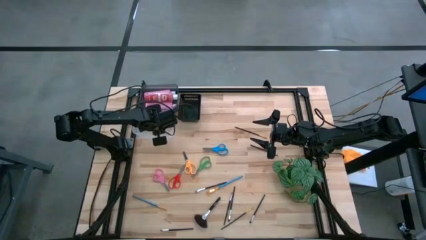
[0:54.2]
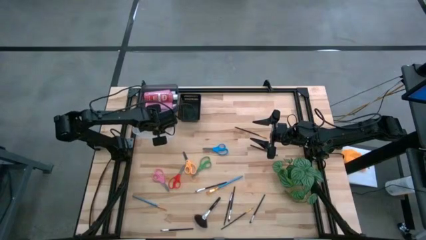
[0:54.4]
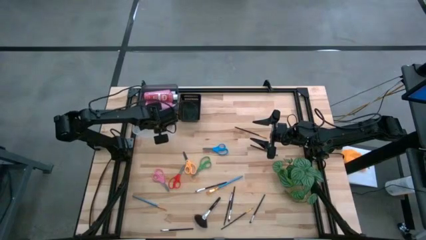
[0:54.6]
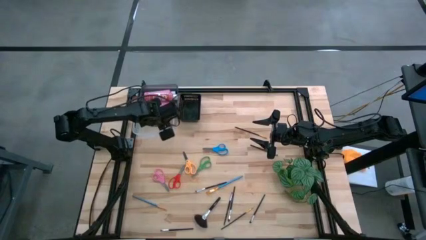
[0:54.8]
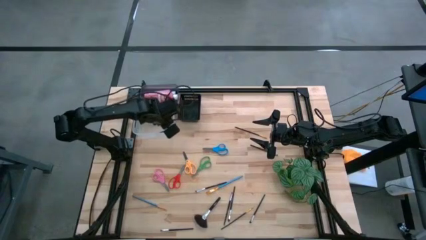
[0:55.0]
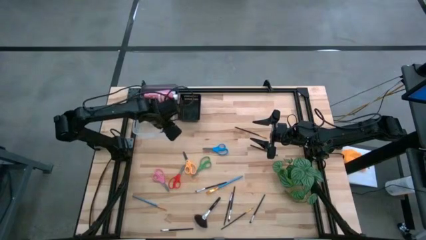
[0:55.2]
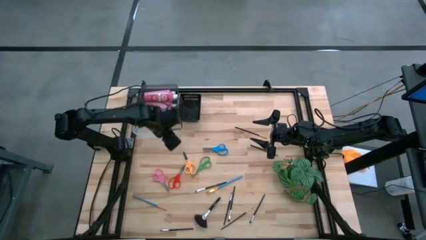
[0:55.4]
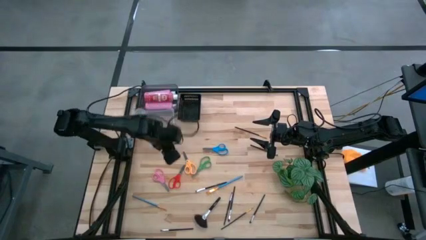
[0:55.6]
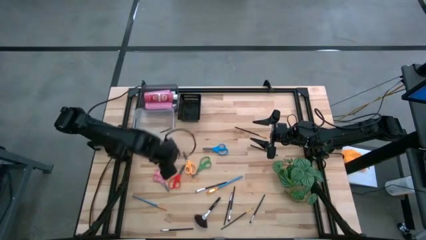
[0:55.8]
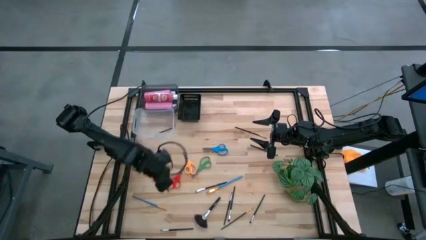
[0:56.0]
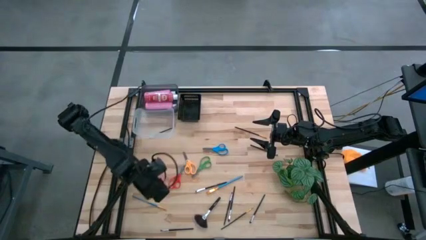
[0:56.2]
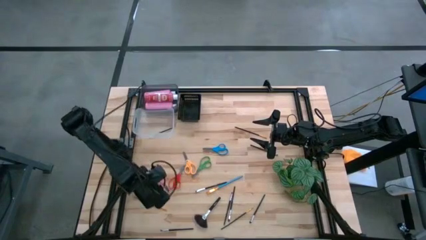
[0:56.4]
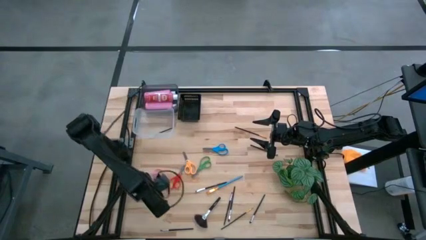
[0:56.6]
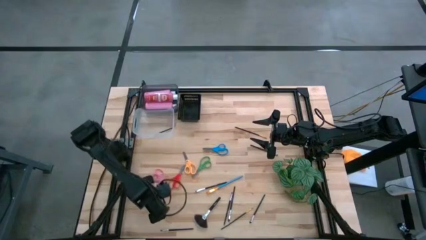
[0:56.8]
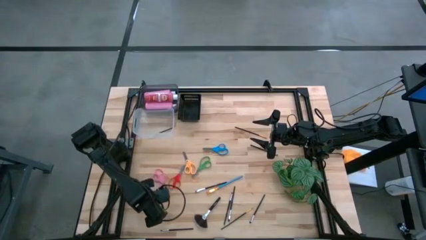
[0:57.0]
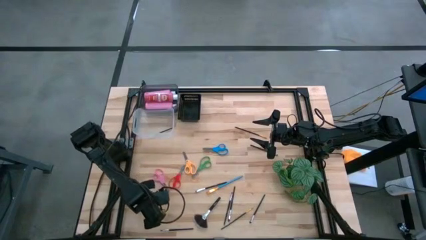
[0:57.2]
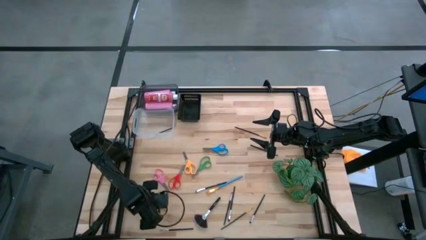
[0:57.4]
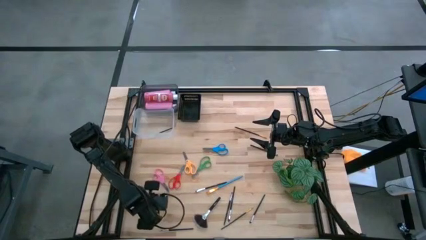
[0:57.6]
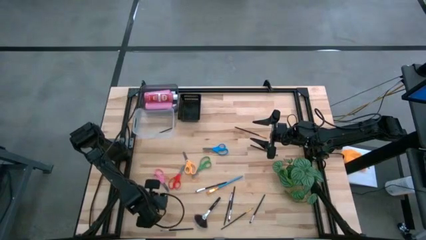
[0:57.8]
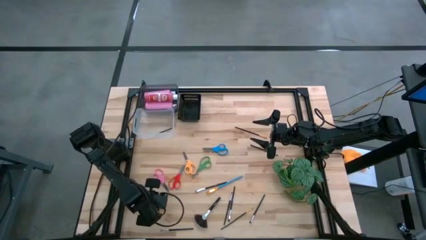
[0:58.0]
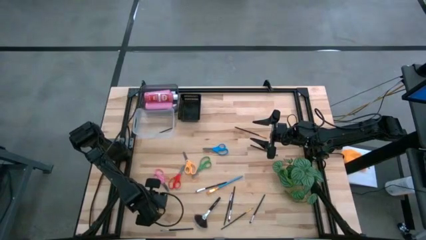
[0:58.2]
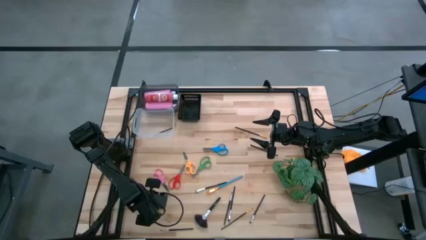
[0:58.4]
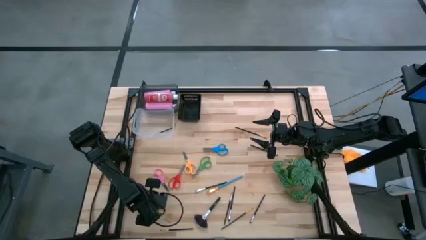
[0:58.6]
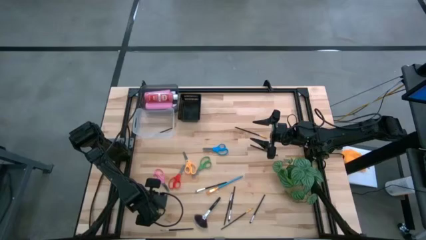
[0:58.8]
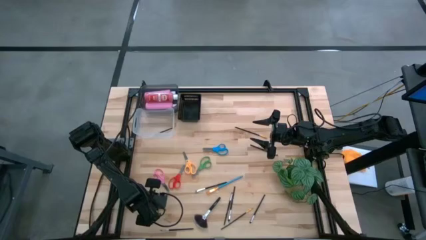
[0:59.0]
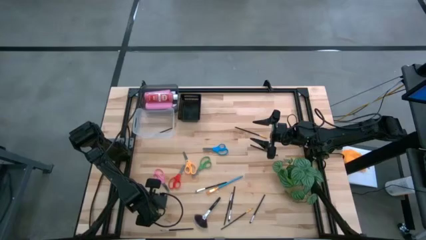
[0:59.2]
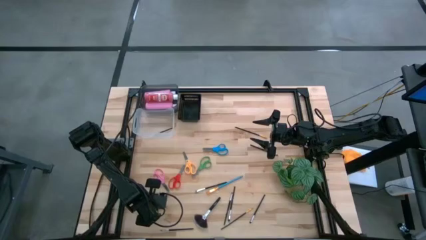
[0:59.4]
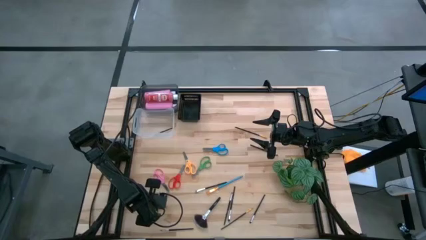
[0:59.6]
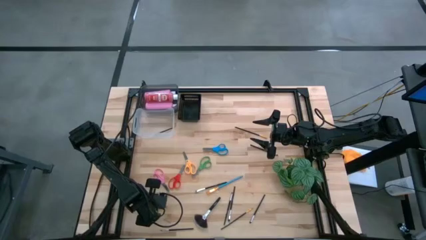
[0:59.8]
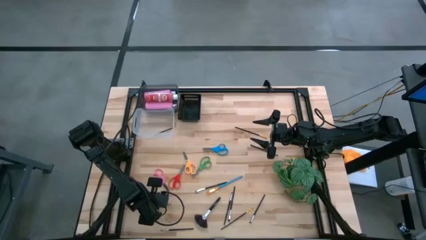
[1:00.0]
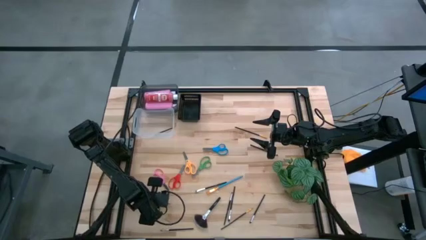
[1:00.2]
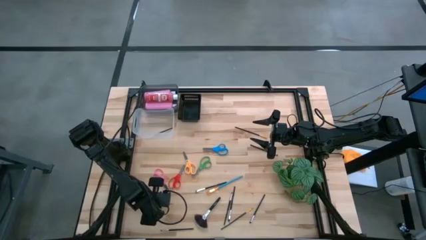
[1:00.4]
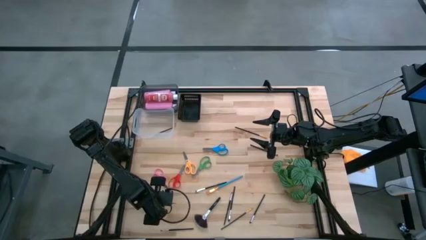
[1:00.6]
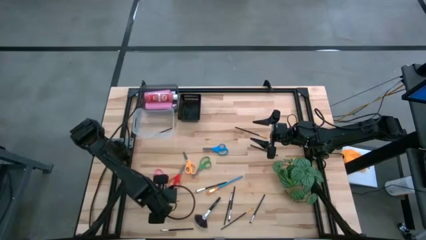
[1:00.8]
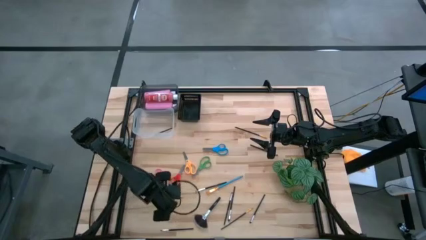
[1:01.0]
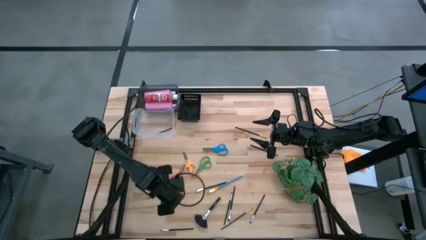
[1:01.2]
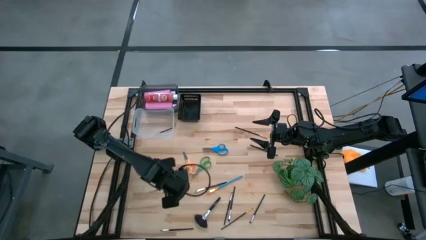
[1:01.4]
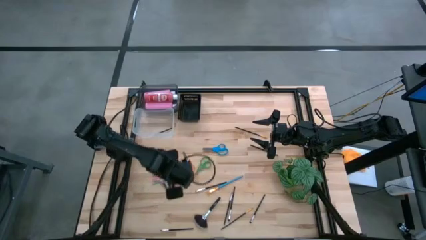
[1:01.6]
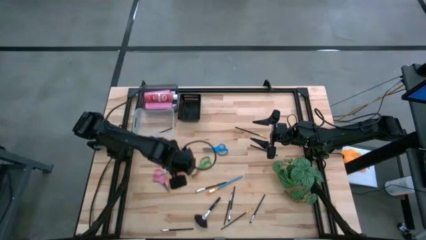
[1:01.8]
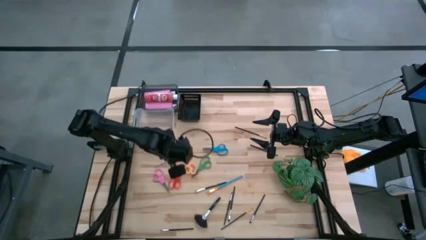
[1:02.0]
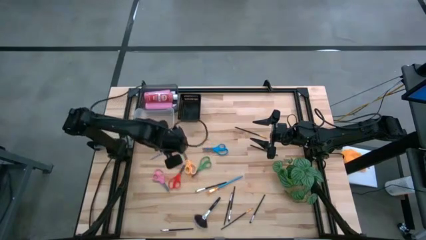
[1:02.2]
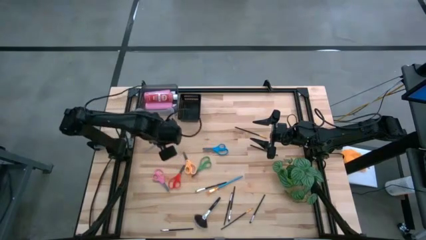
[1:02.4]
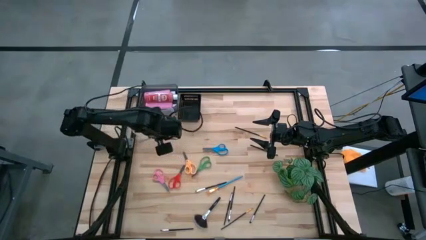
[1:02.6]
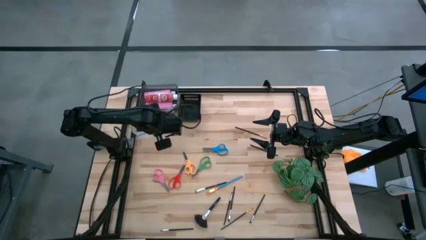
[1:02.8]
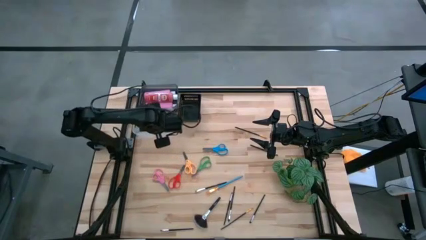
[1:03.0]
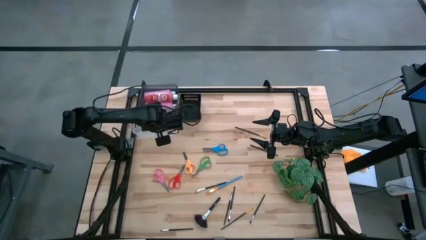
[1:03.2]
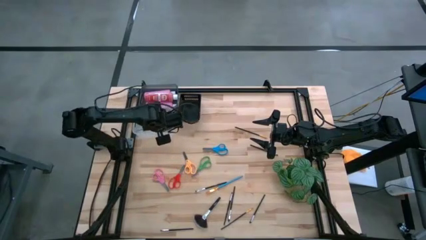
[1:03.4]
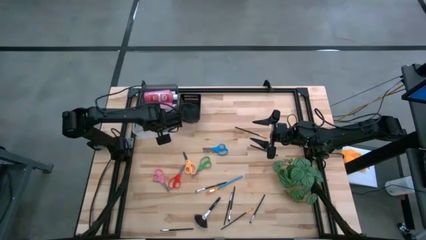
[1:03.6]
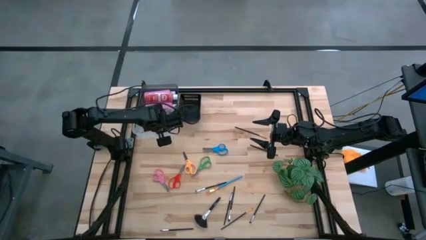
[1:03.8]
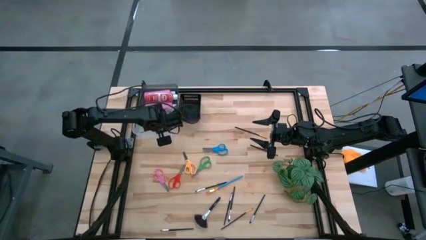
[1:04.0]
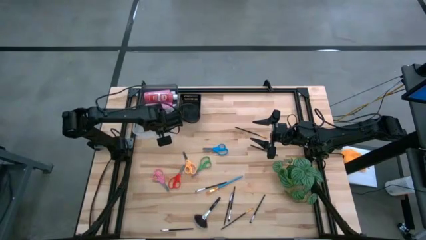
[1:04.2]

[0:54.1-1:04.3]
Task: Pick & Place Paint Supplies
Put the blue paint brush into the transparent bin

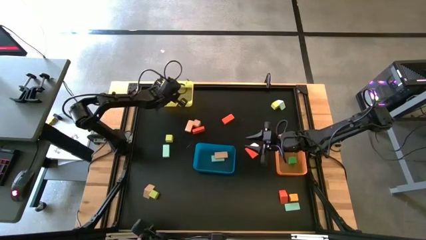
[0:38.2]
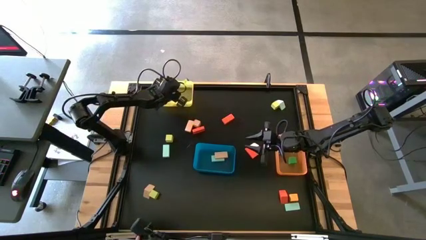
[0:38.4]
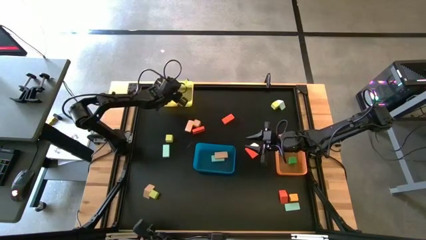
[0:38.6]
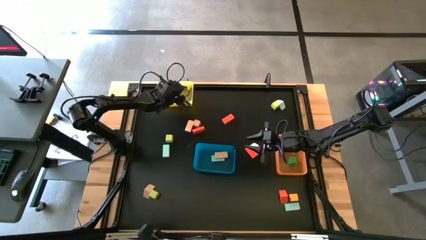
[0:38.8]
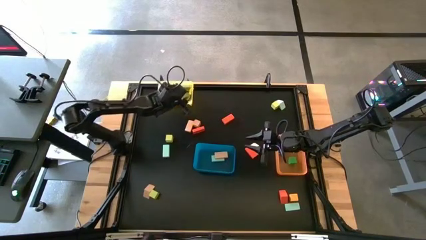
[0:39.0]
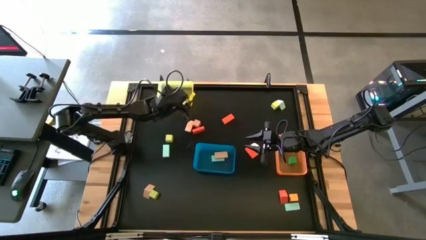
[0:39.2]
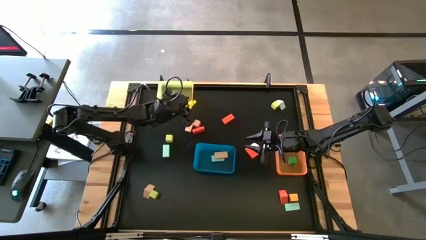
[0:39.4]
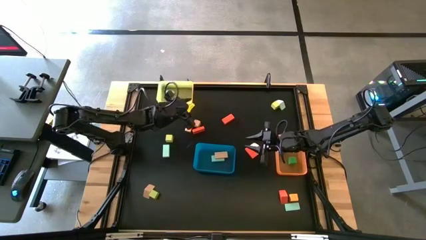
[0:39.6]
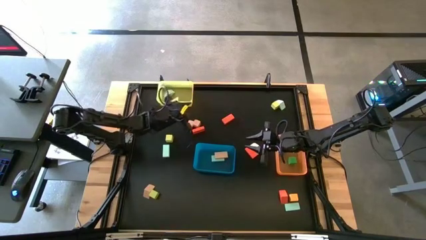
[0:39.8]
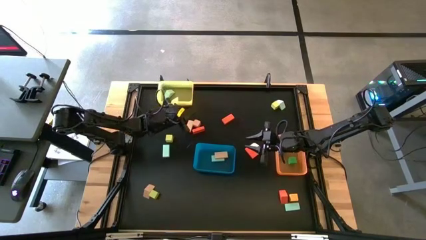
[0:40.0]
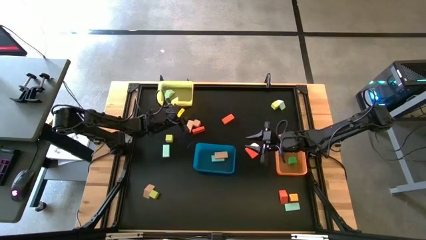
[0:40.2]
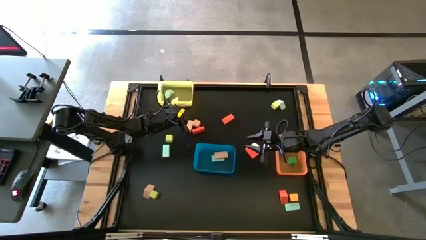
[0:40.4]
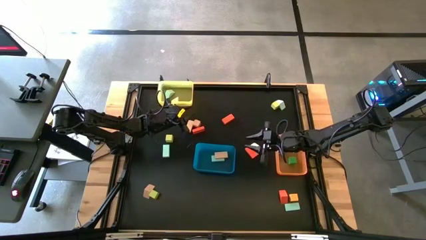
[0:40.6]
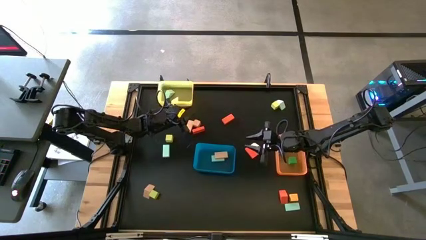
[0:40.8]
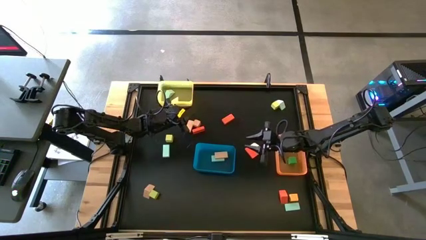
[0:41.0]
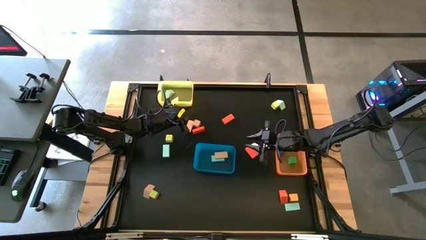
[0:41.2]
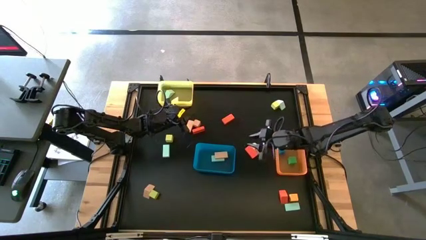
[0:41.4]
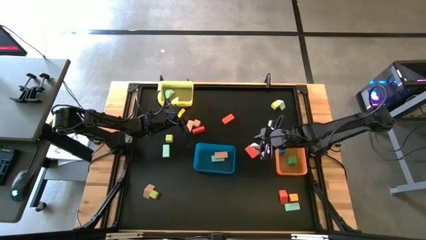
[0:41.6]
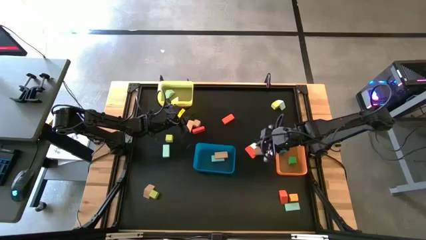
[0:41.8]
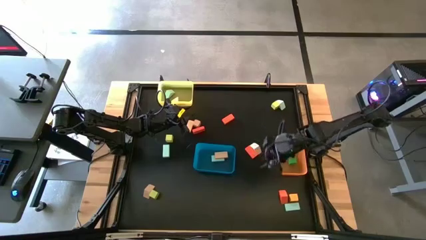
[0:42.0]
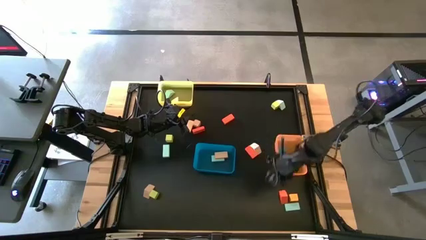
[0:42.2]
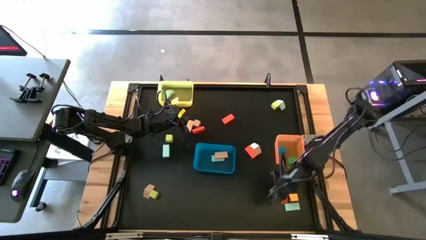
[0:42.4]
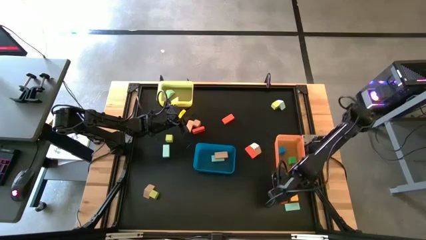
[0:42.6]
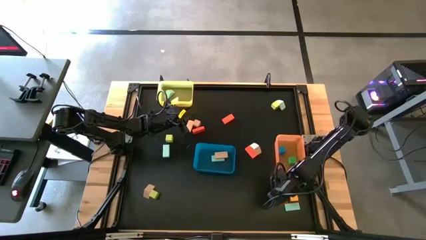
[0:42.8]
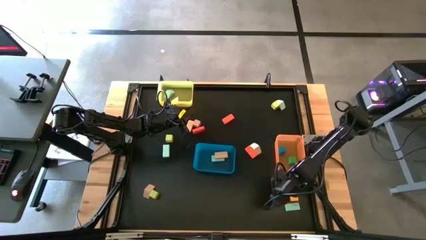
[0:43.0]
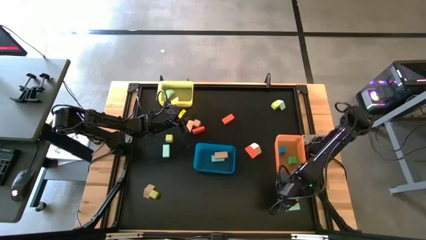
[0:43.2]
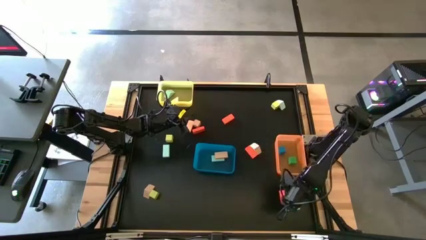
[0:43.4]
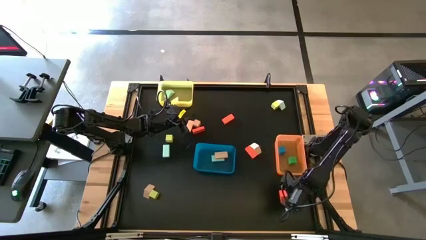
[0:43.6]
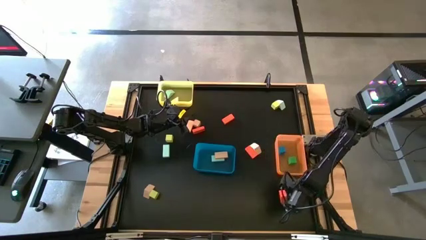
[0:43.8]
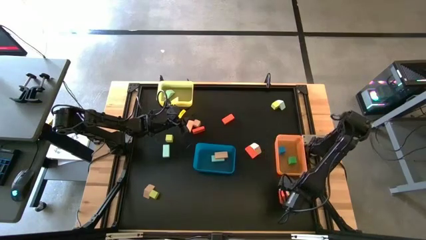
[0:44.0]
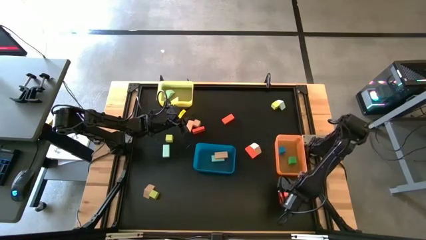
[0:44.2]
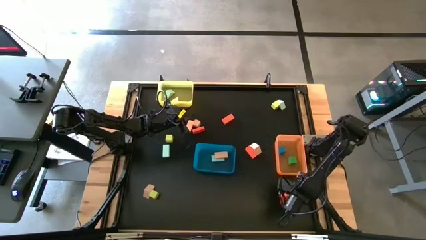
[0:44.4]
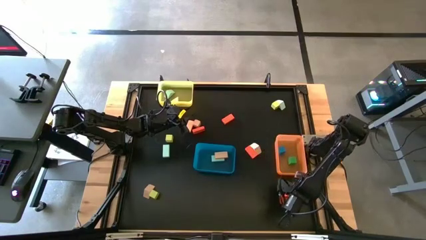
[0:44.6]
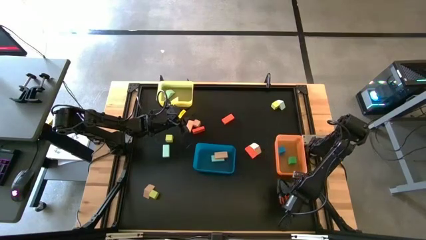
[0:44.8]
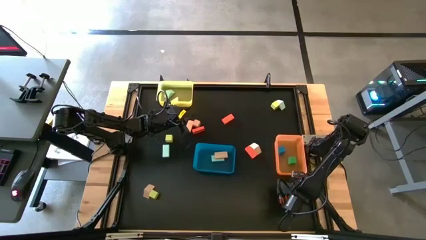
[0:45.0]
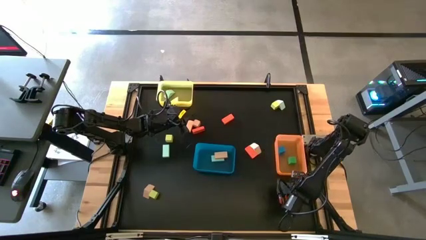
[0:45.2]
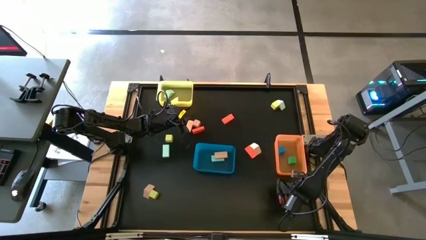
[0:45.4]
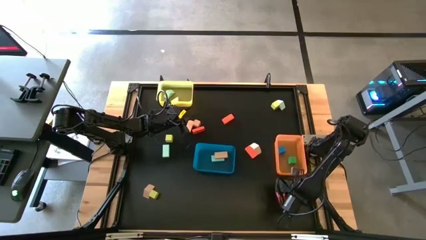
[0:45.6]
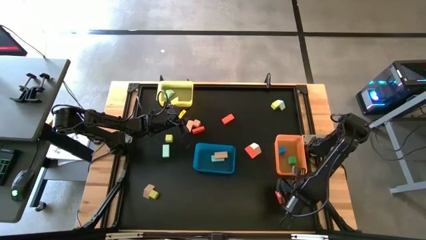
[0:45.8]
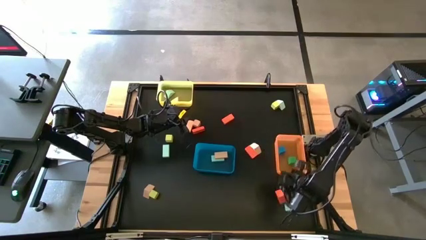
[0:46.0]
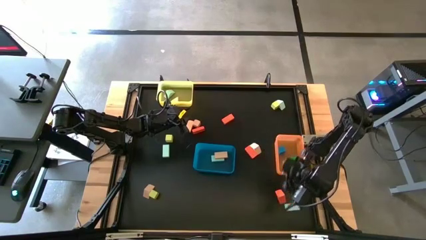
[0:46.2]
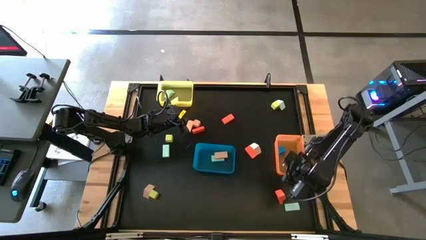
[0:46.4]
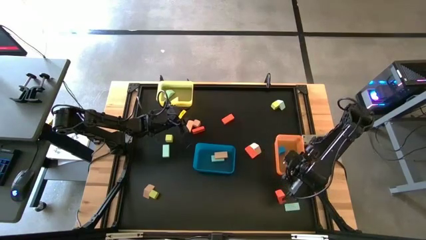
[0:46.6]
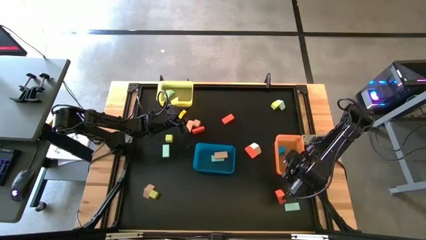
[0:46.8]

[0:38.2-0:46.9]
Task: Sort blocks by size
Put the light orange square block into the orange bin
